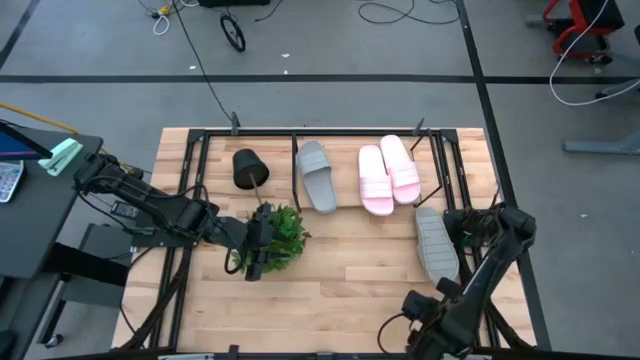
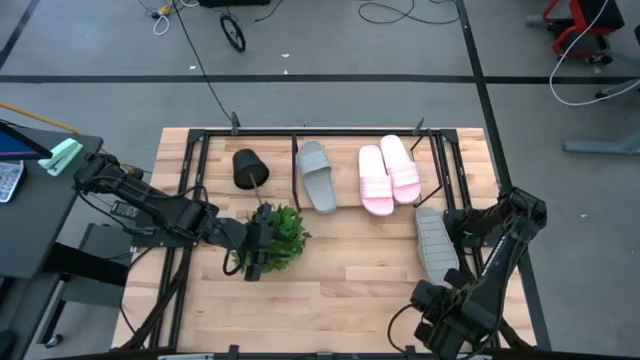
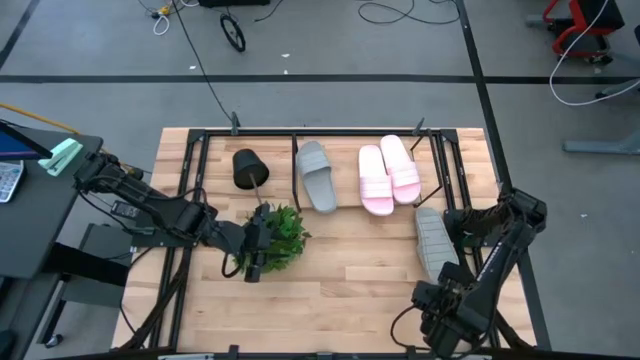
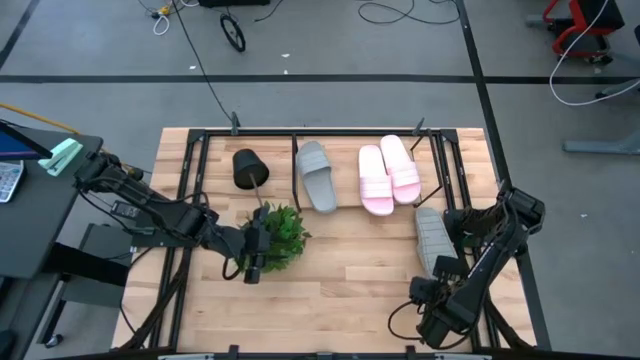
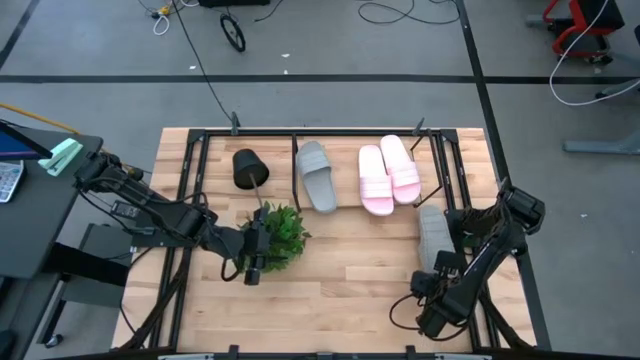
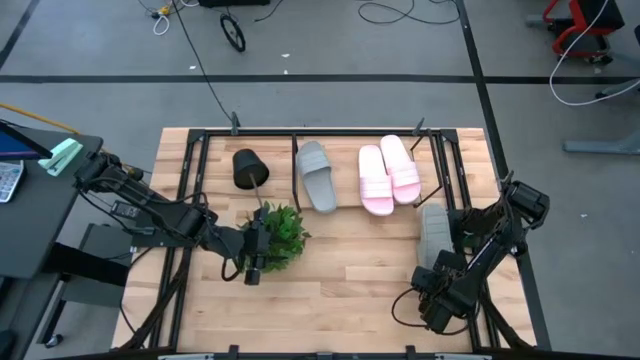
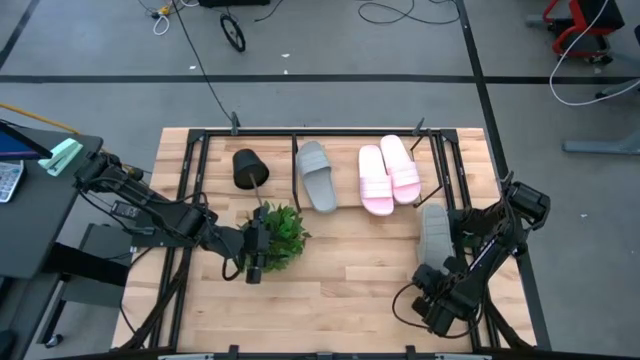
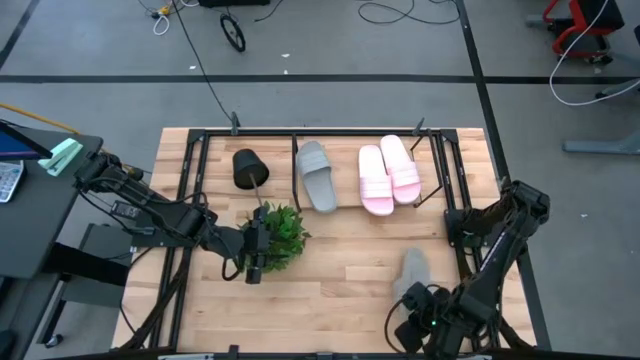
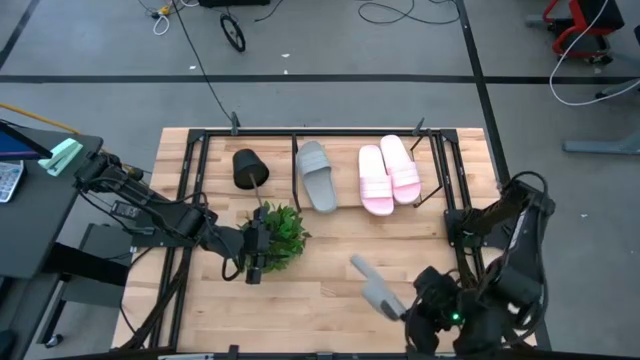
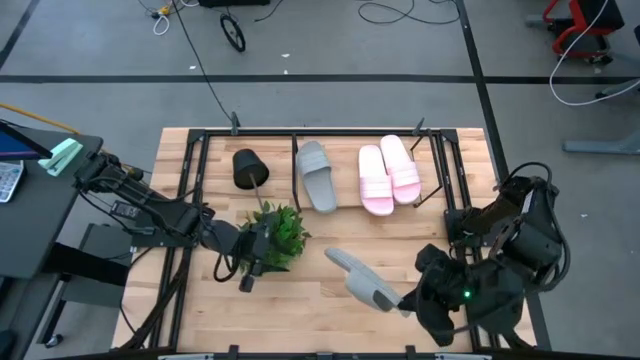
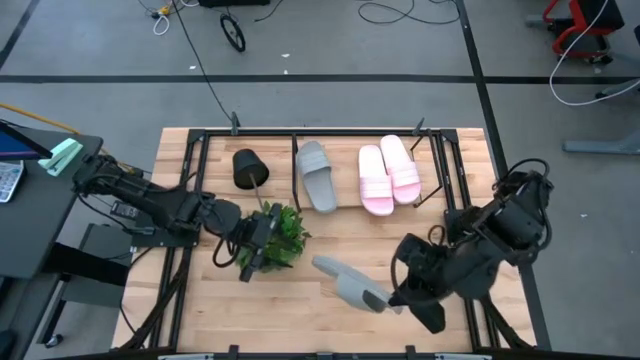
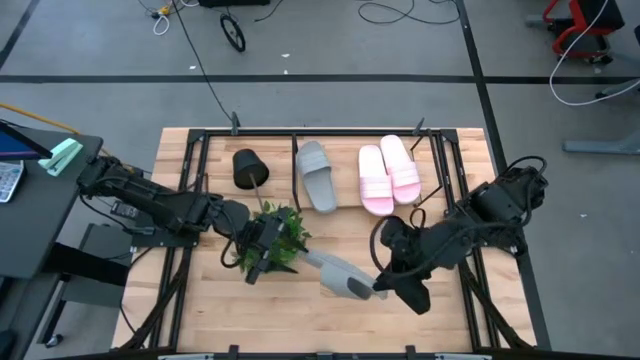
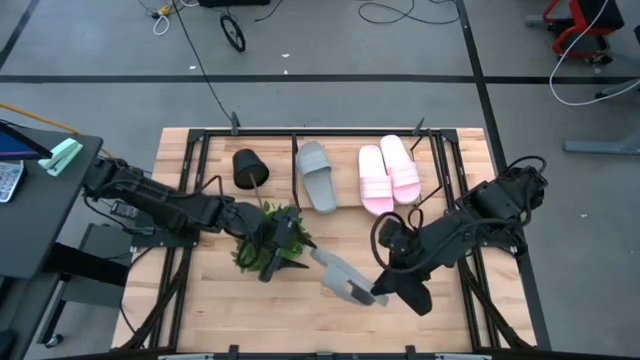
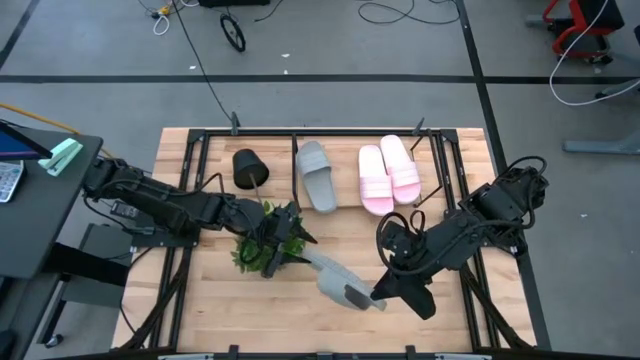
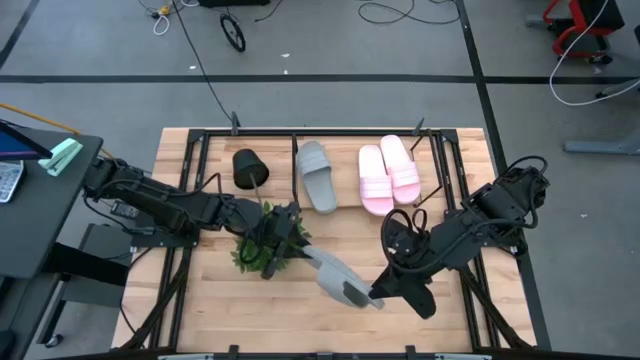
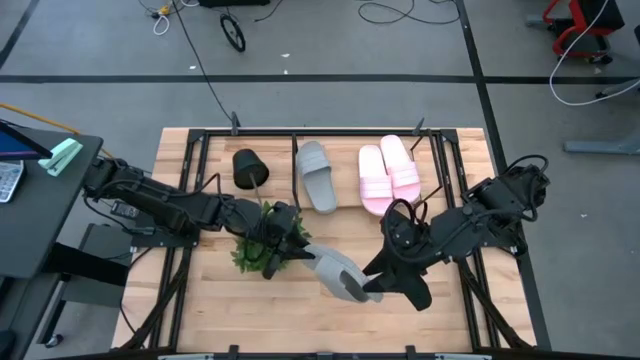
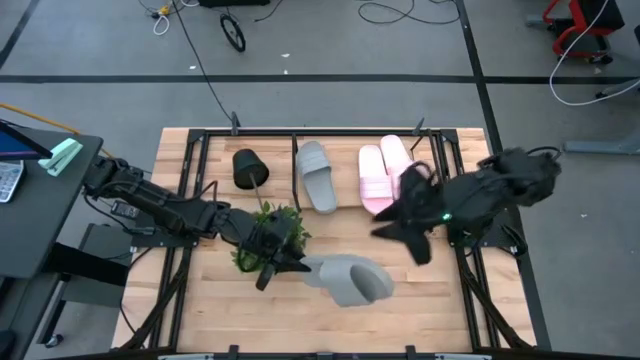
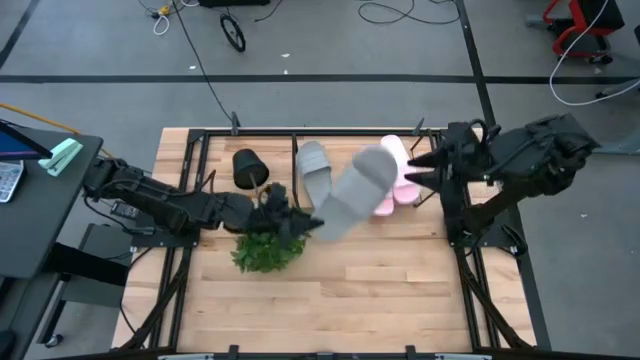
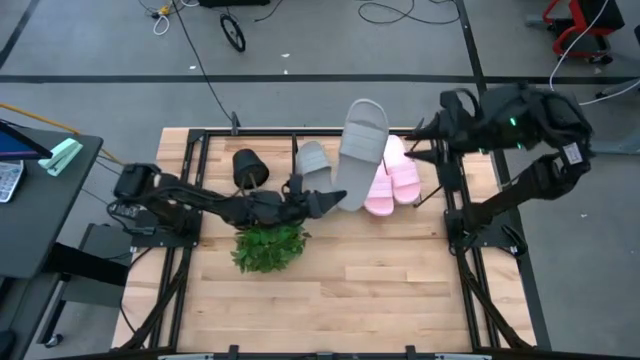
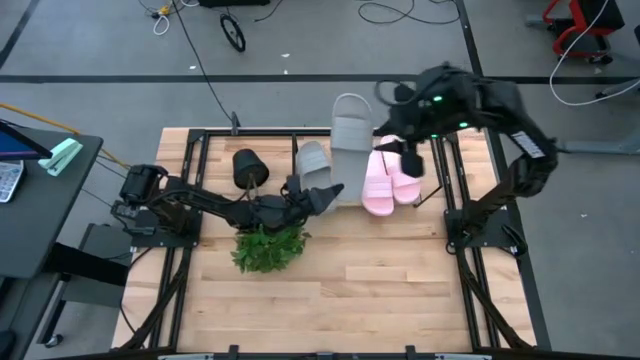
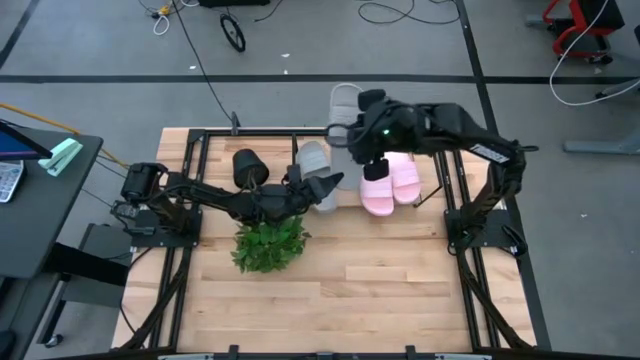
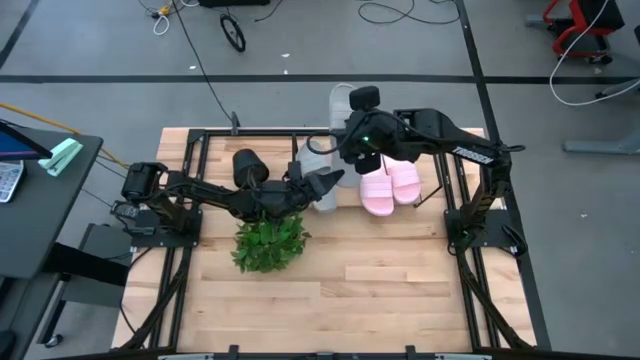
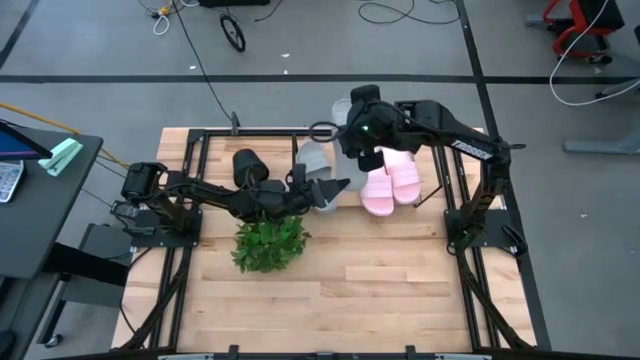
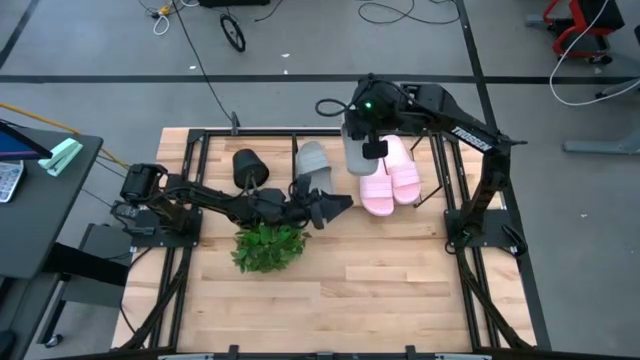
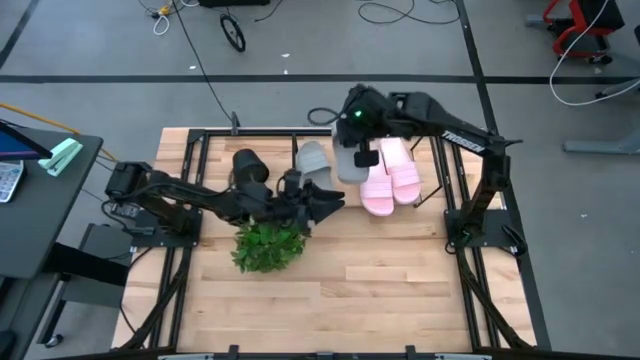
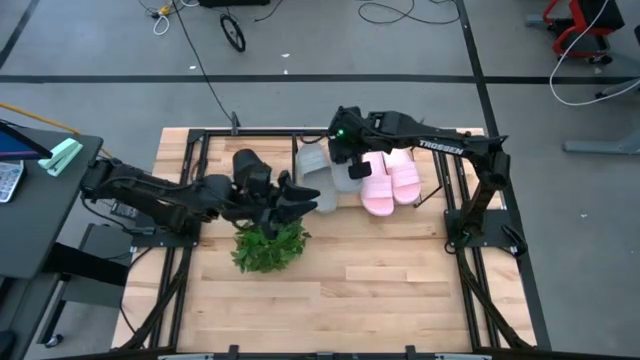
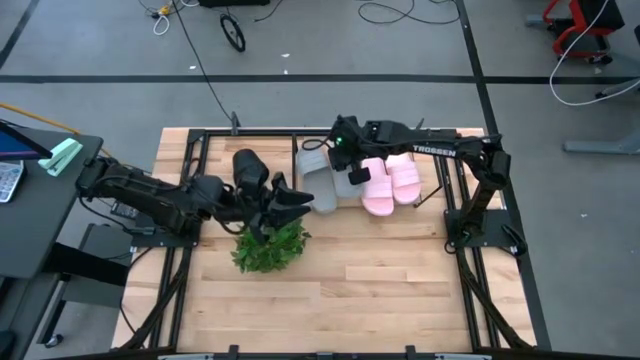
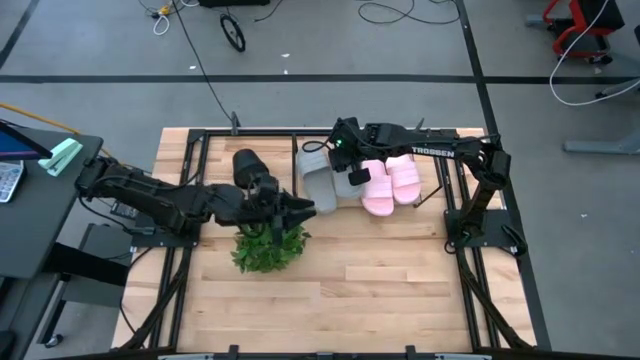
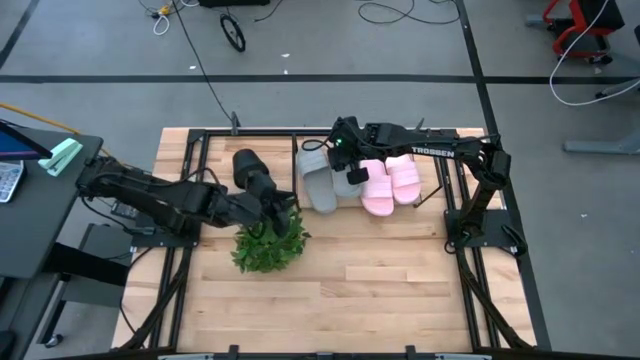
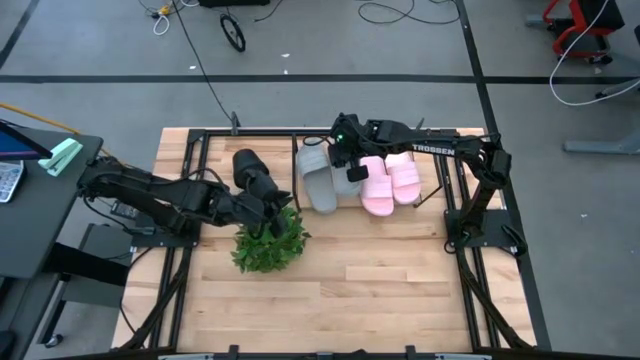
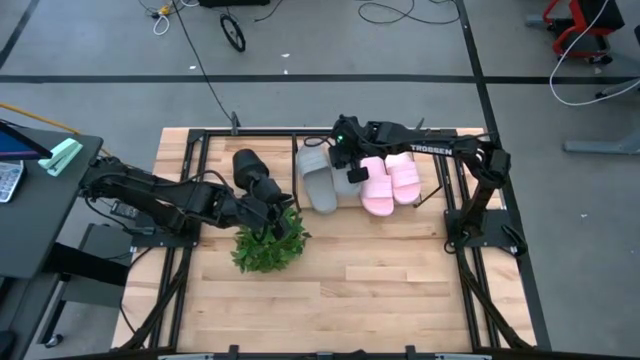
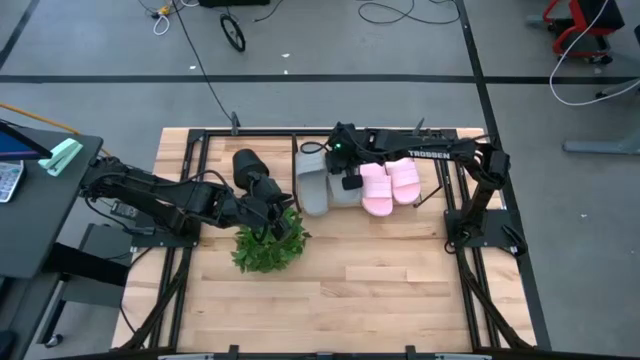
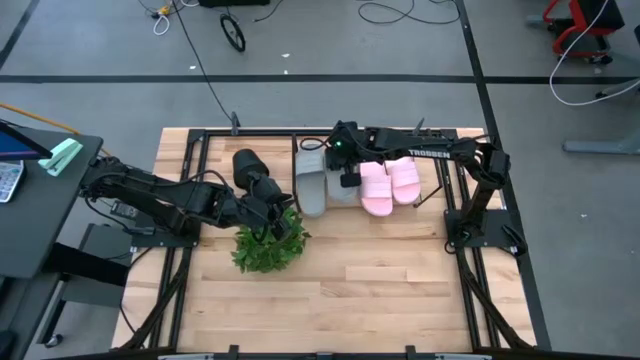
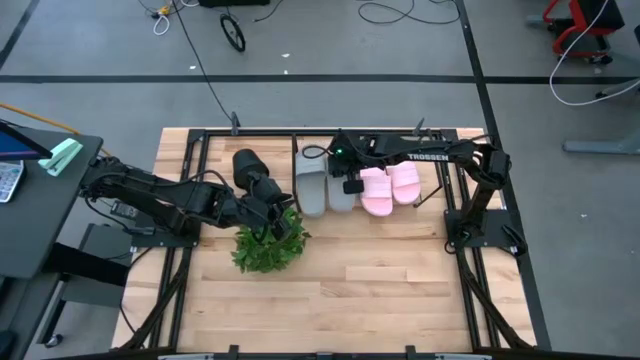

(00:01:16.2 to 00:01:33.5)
Task: Pick and place slides into the shelf
Put the gray slide on the shelf

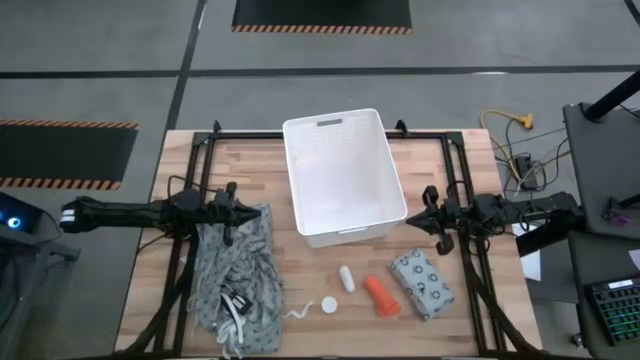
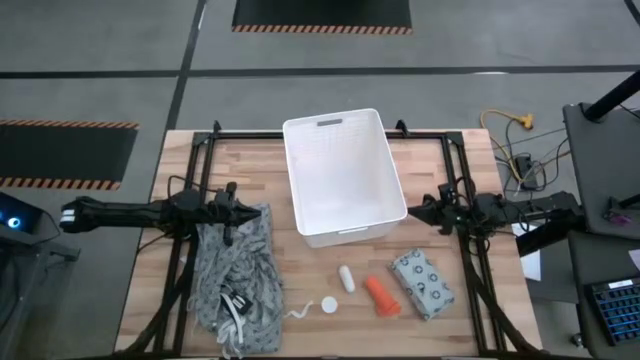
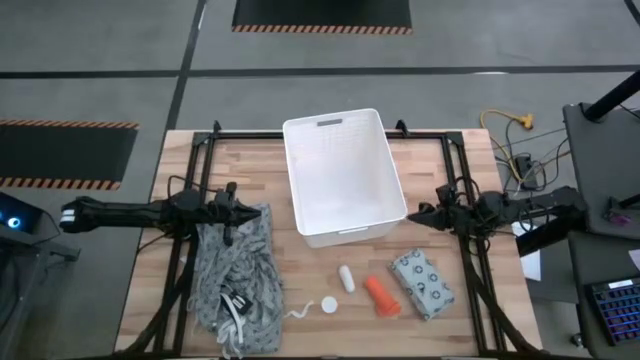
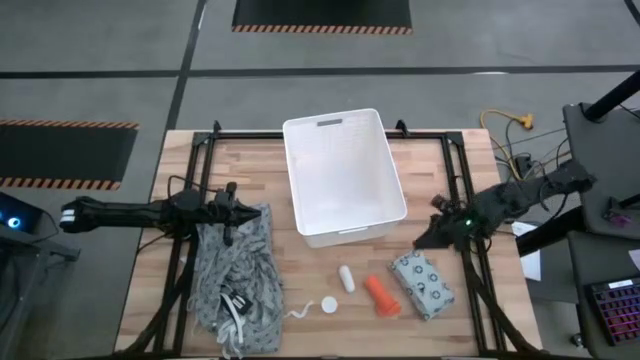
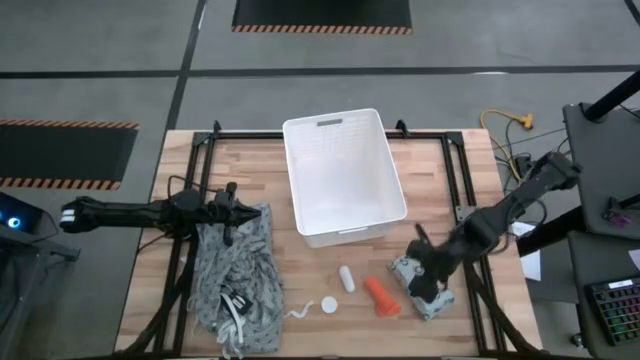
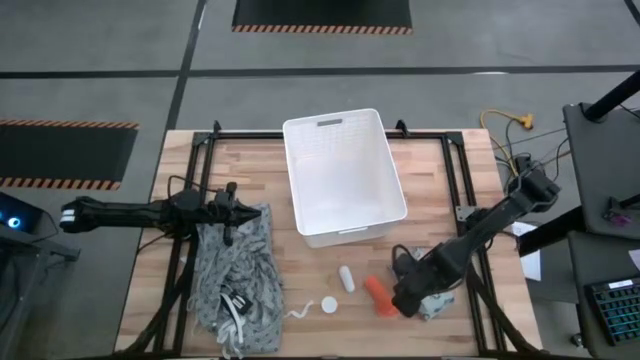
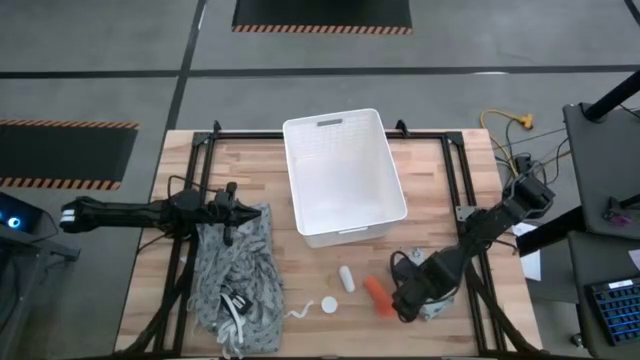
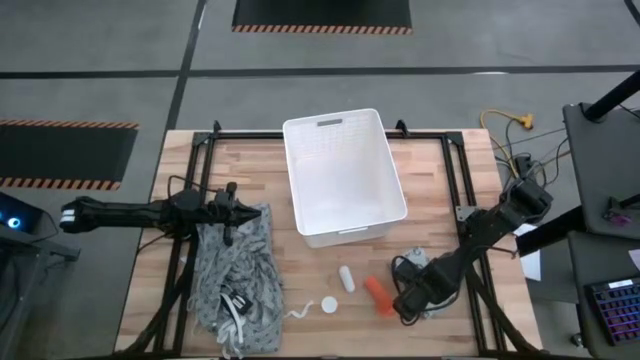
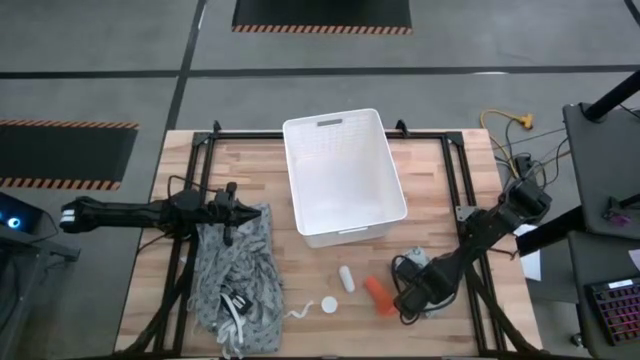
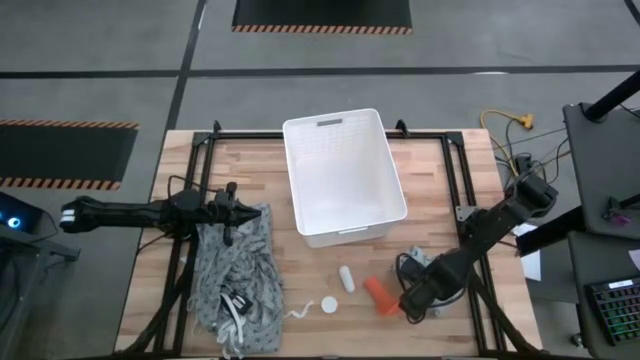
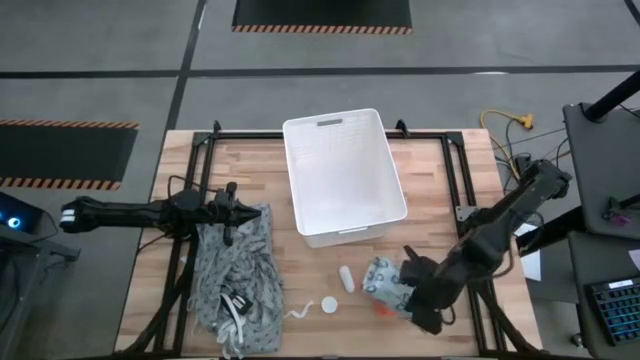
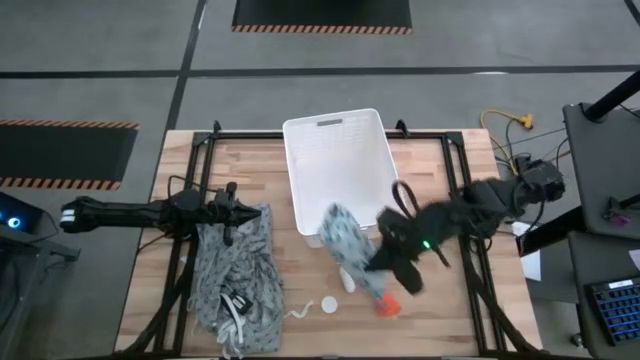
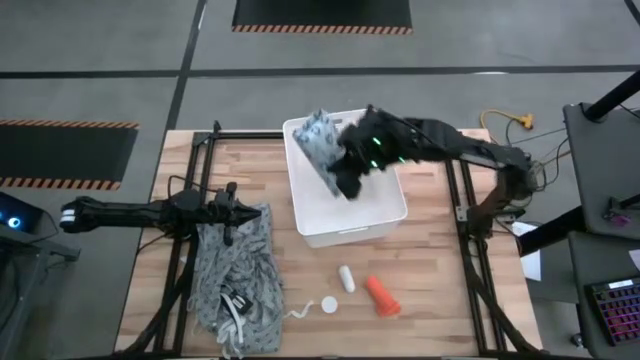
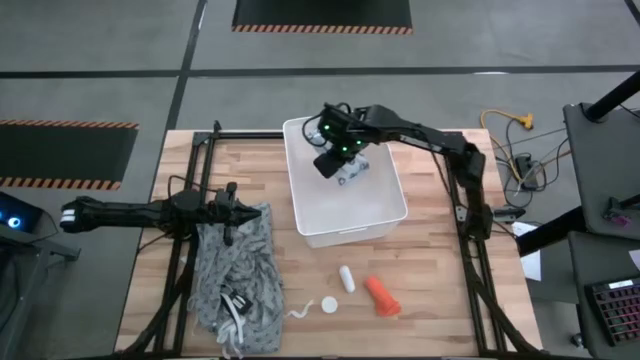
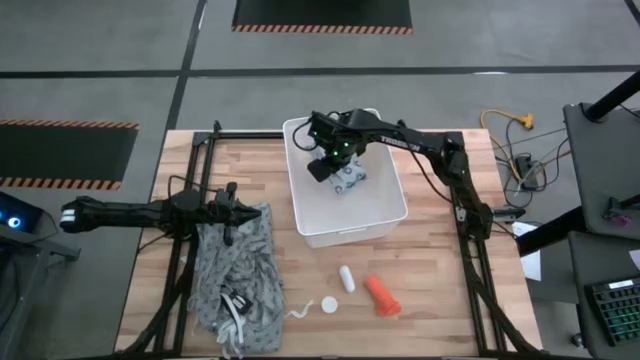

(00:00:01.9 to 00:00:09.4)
Task: Pick & place medical supplies in basket/bin
Put the blue mailer bag into the white bin
